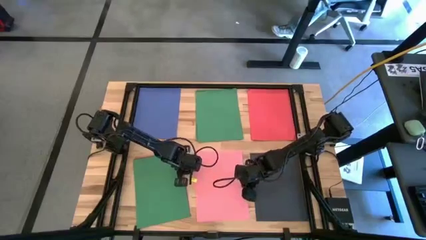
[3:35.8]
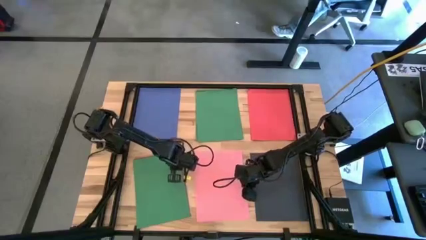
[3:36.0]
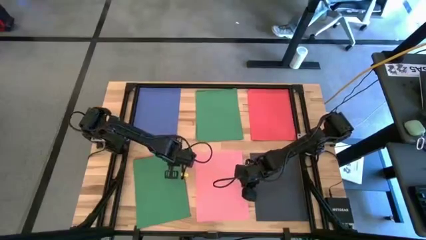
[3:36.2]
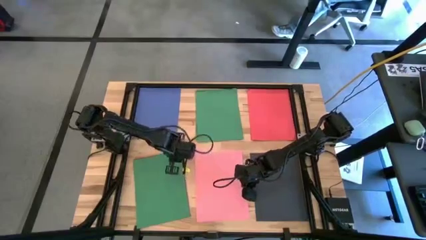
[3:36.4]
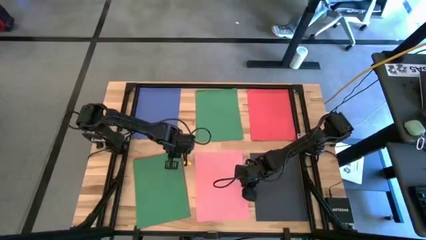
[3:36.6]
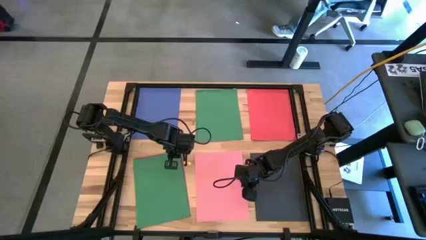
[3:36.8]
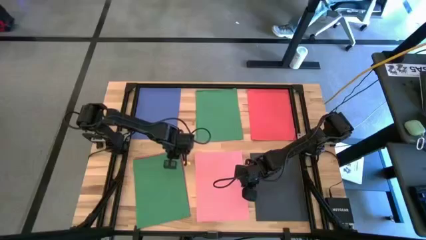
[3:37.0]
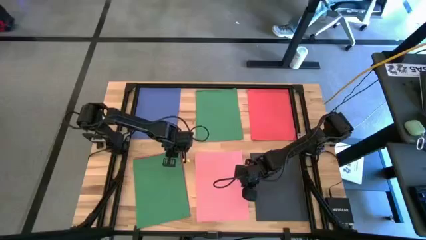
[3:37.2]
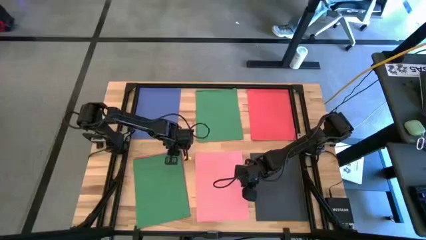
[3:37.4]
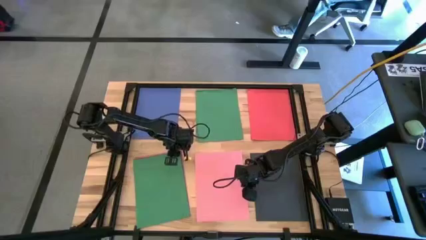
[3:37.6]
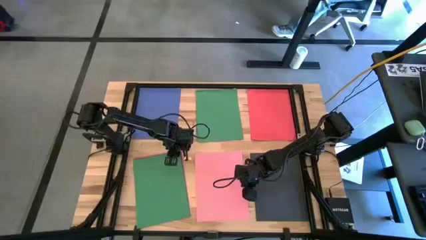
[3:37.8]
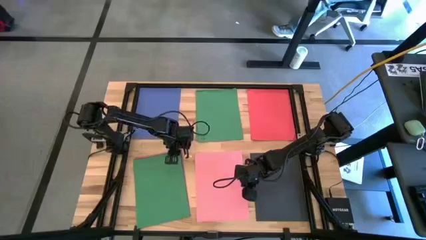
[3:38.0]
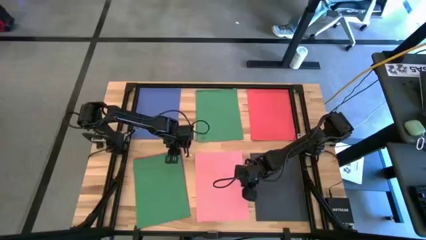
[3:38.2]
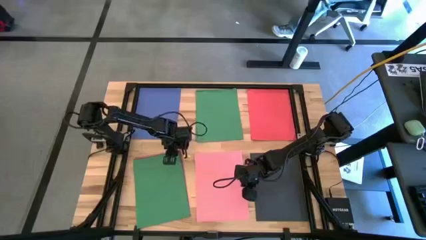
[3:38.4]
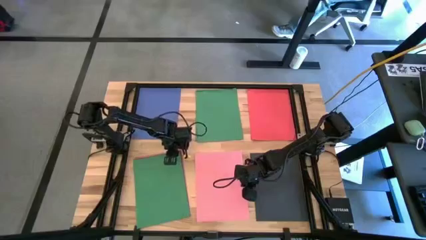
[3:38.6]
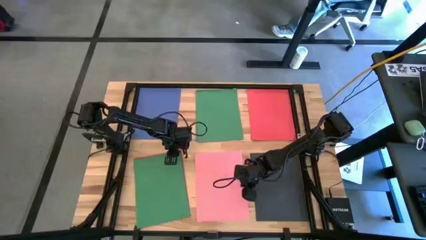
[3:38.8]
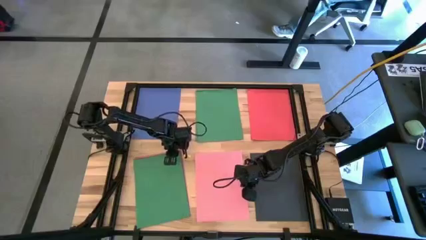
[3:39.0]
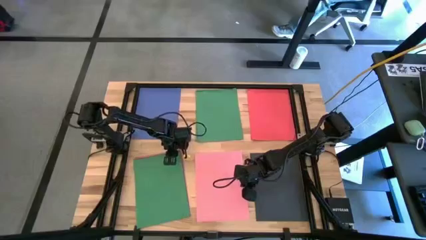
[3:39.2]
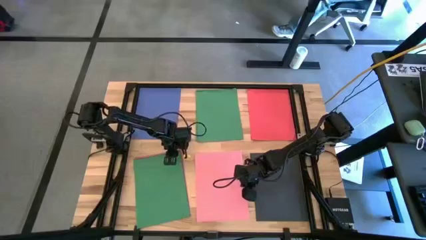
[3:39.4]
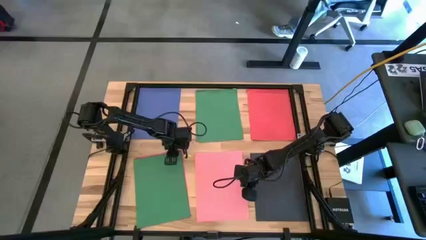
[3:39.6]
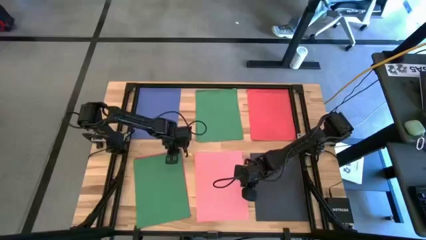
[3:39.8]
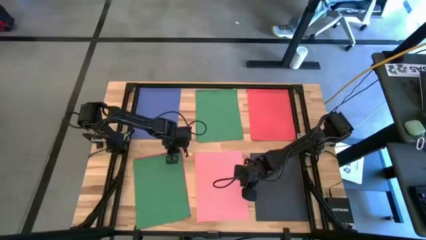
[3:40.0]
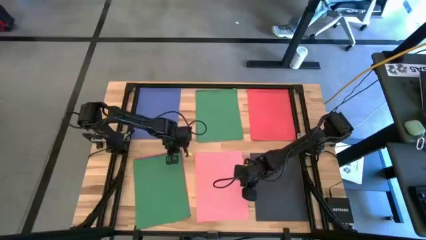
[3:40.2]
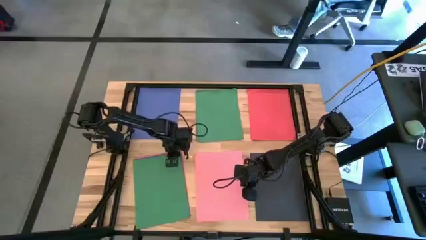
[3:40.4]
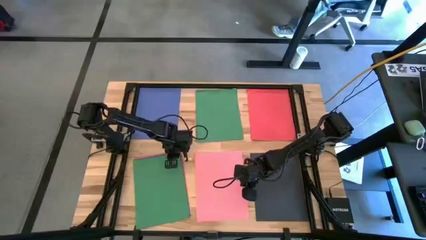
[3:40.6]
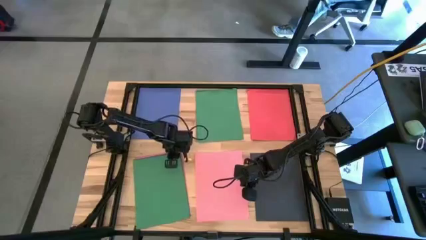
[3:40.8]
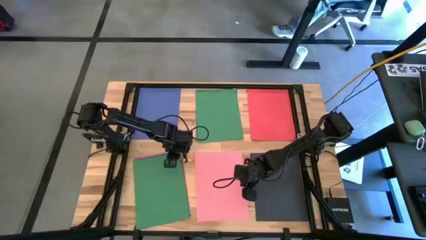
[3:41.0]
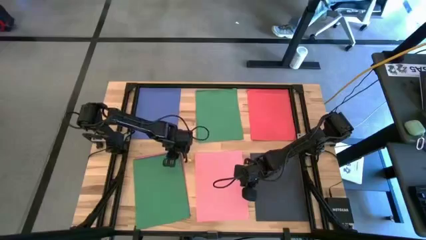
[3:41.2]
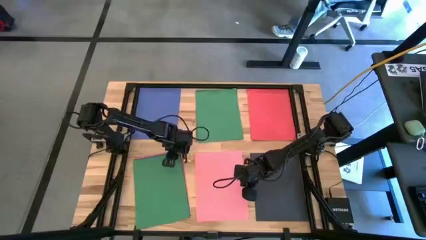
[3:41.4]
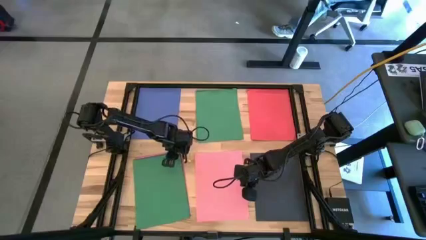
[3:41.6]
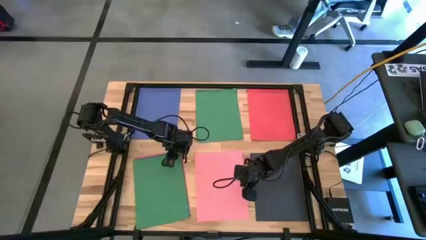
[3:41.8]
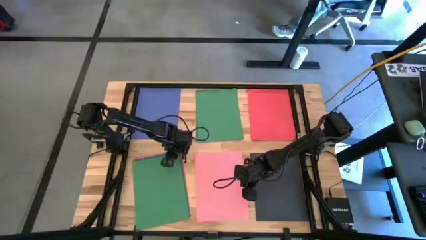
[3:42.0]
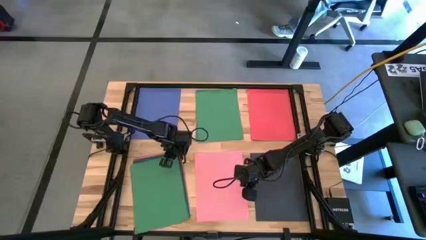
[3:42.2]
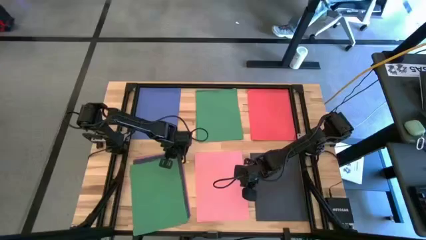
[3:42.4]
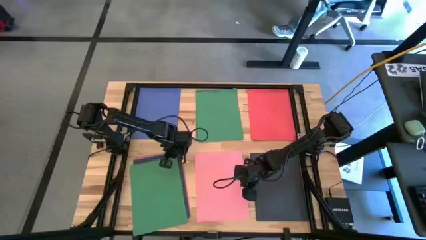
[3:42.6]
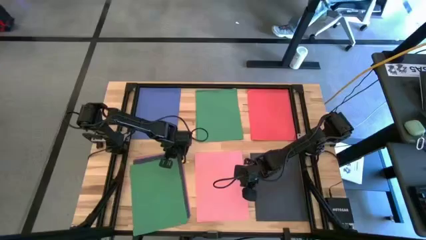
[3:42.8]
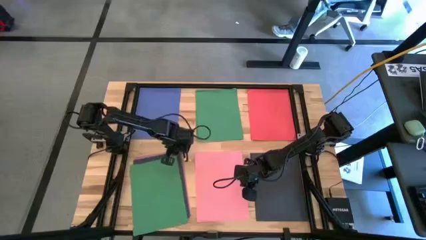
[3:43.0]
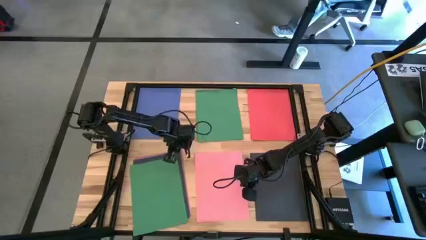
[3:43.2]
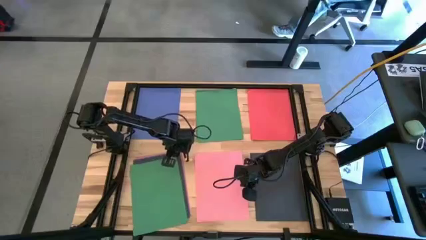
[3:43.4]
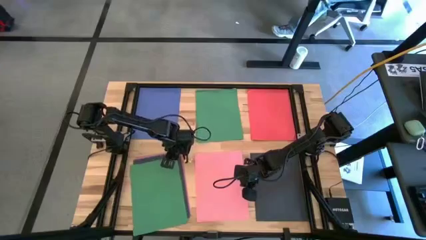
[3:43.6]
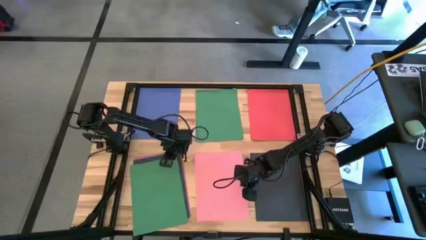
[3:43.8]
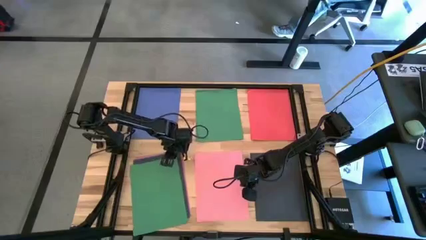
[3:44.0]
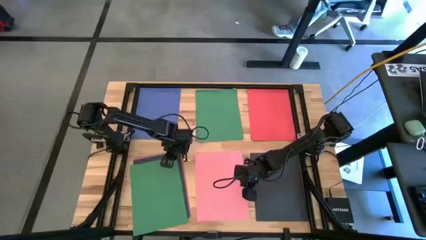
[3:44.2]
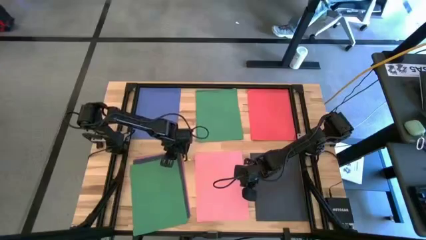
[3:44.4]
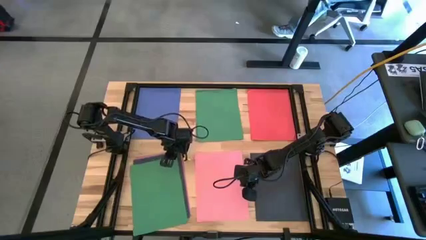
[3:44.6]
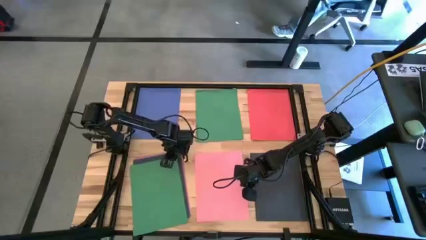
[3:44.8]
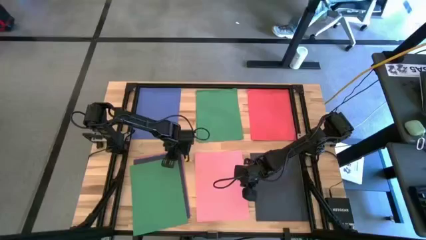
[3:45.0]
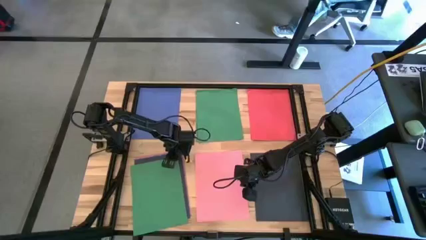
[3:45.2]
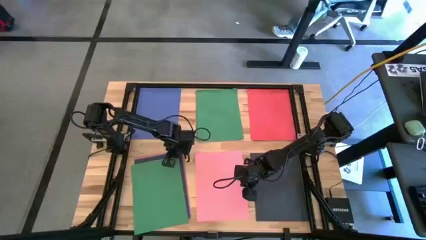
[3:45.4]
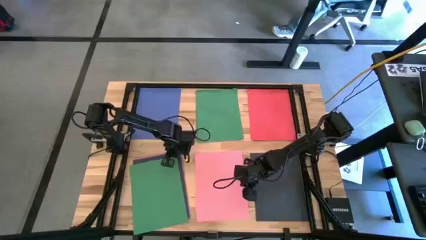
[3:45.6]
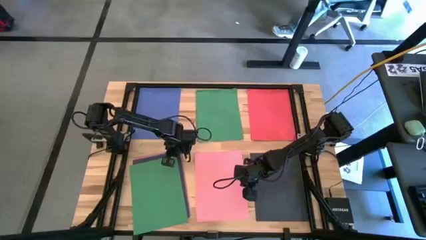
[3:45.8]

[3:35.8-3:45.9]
Task: Organize paper
Stack the green paper on top of the other green paper

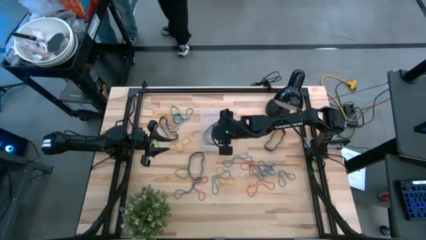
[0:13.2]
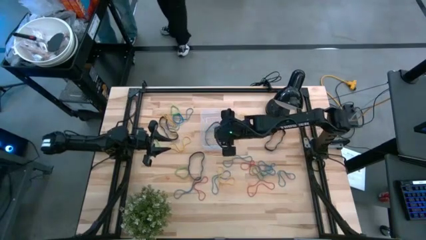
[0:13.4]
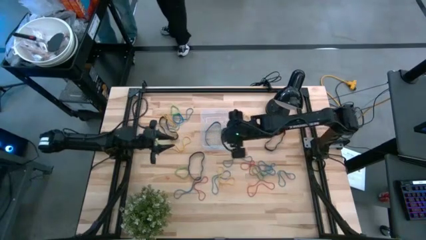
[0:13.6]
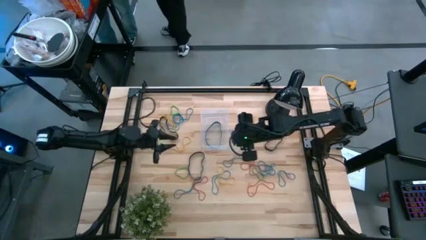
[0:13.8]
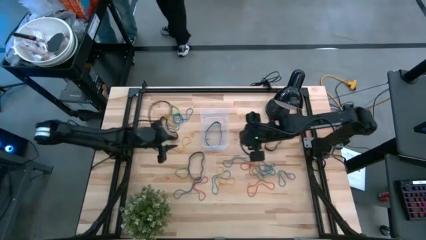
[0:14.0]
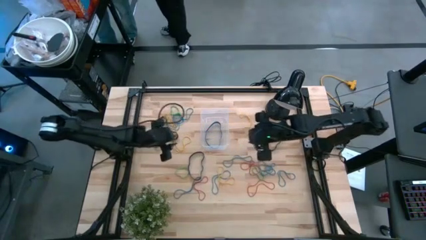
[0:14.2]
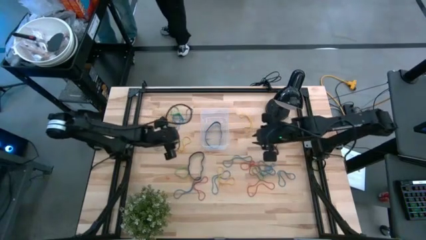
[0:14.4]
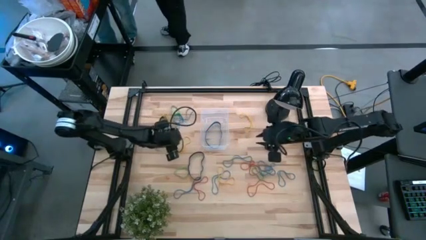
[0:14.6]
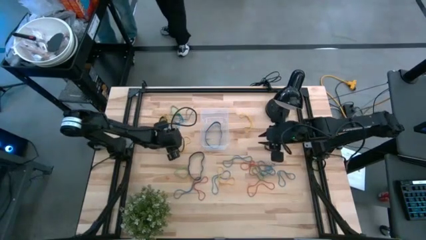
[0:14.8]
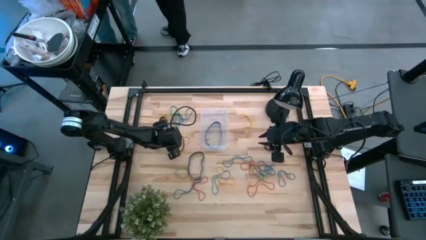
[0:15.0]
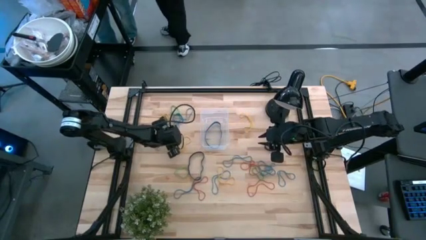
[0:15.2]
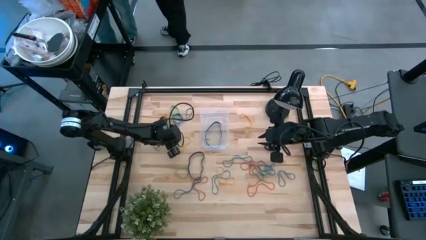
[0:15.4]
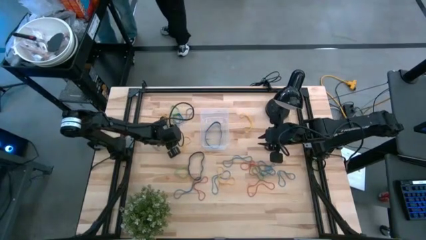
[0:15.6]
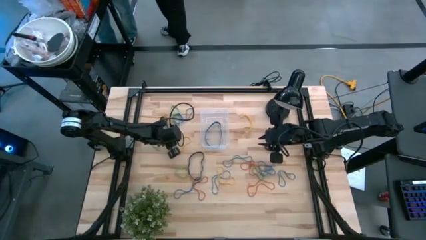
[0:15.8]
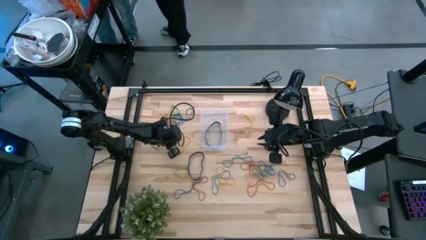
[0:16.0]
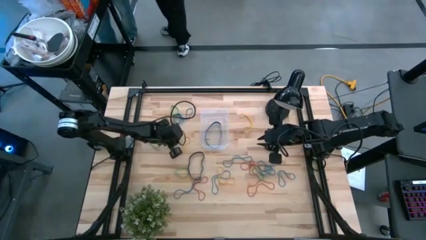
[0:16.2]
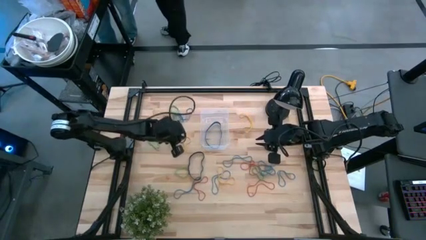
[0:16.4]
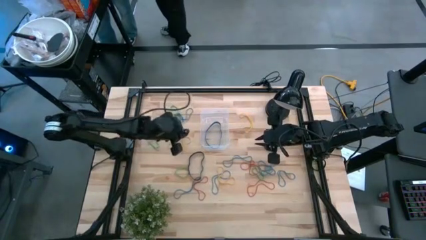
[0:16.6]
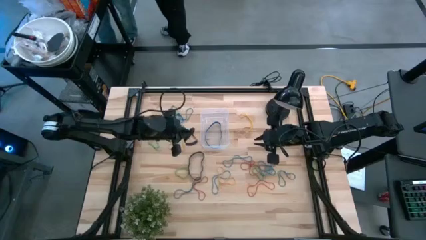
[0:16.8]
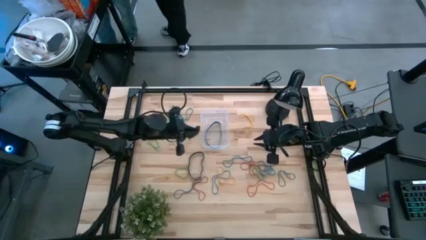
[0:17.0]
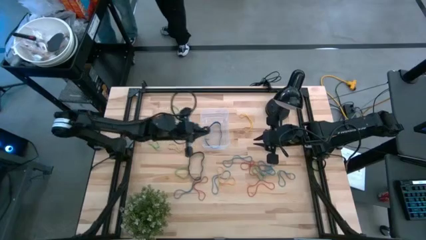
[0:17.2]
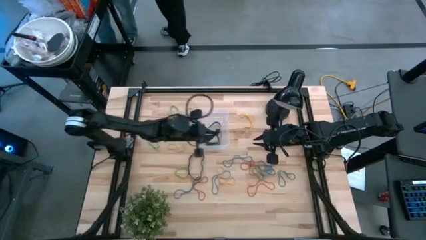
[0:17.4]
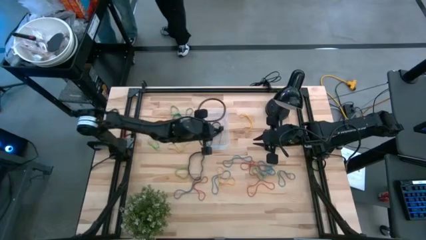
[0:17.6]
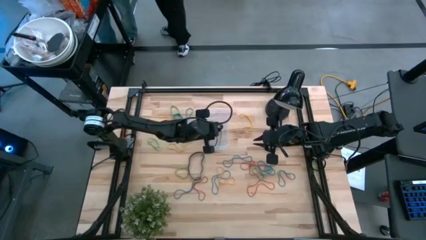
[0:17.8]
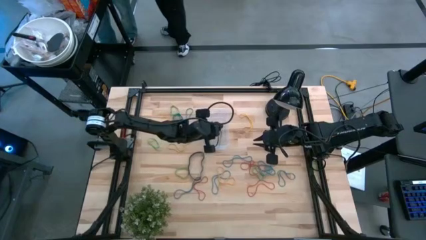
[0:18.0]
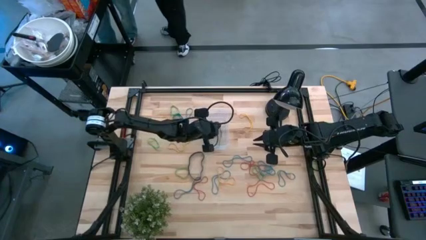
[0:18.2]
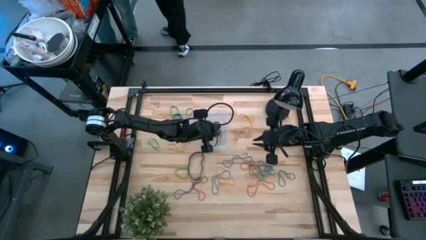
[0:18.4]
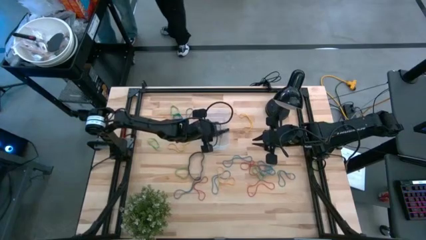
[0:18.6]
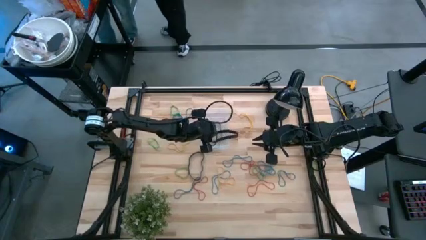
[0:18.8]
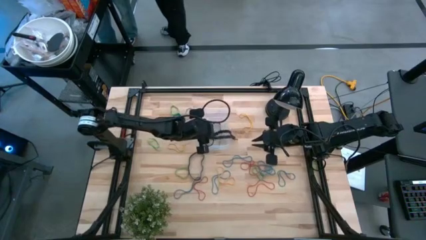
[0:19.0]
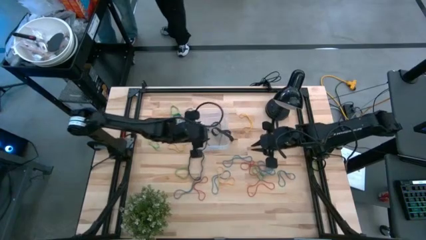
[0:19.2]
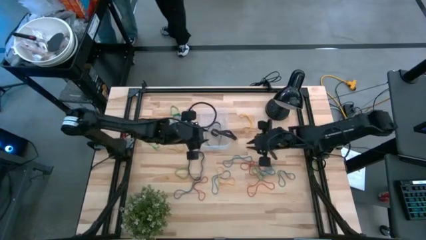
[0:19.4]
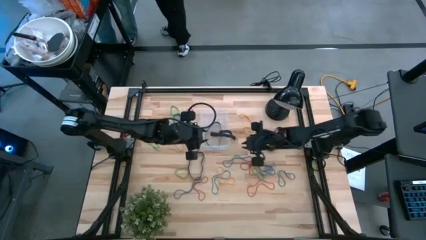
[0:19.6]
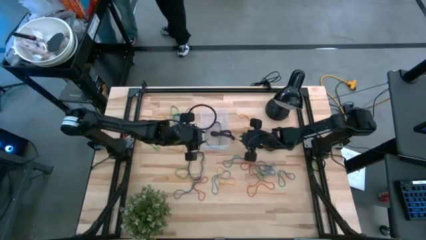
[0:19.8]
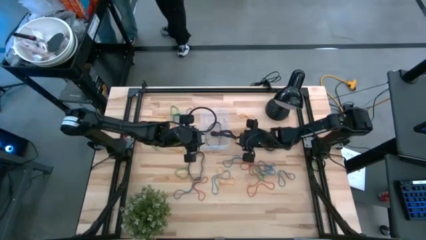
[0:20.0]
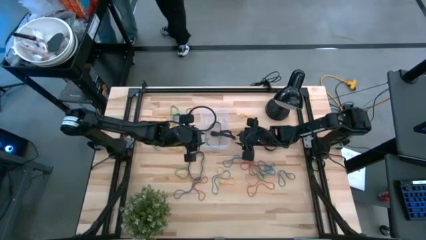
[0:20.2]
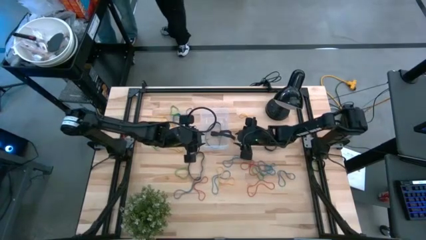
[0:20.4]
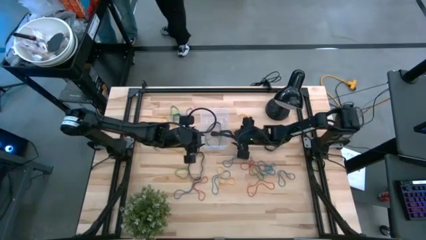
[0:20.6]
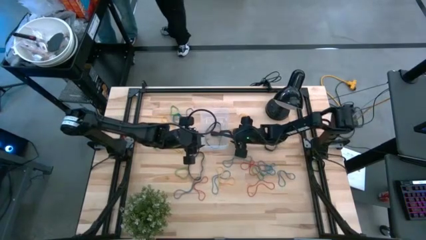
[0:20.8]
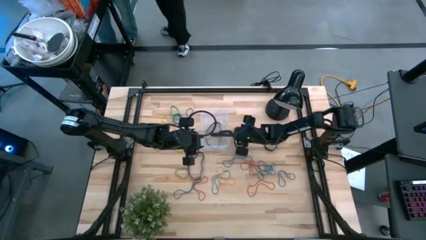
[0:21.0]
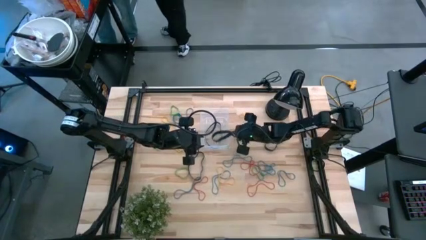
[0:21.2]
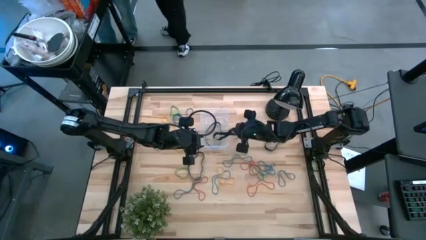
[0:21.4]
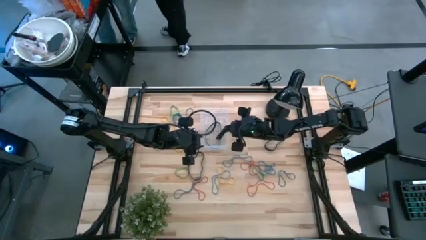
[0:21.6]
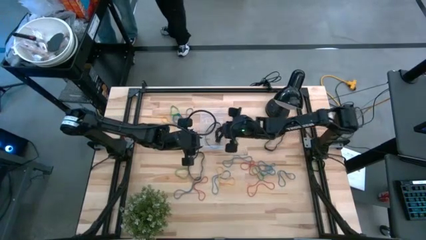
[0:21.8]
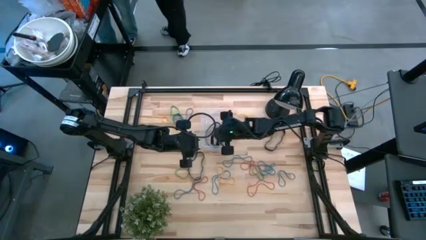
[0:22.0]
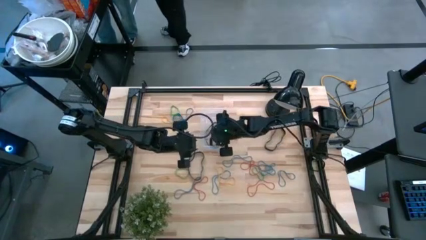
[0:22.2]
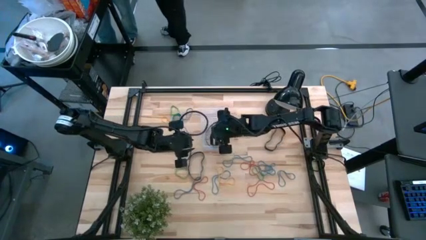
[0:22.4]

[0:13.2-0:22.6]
Task: Pick and place rubber bands into bin
Put the black rubber band into the transparent bin
